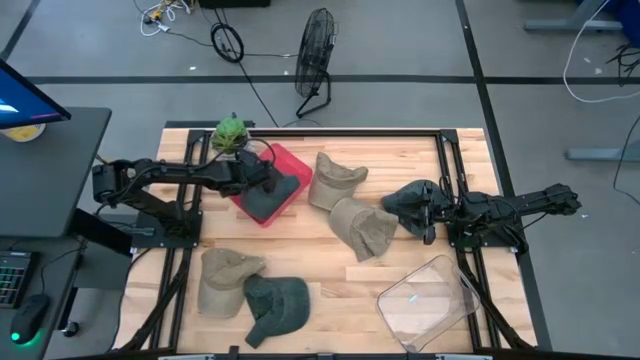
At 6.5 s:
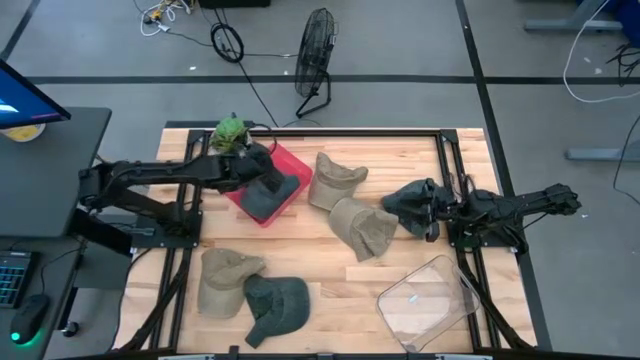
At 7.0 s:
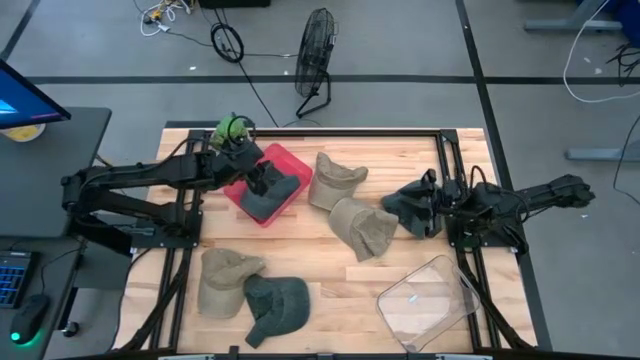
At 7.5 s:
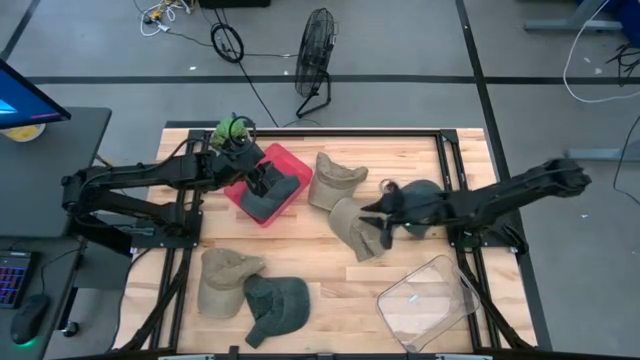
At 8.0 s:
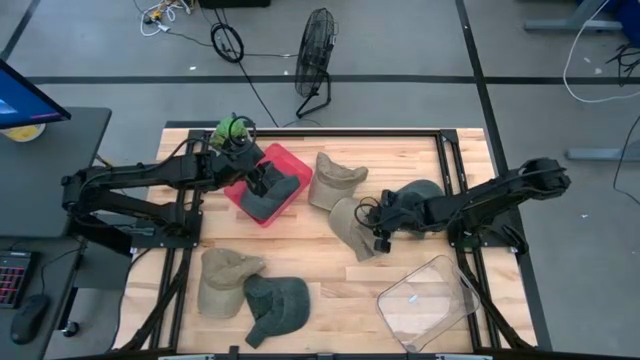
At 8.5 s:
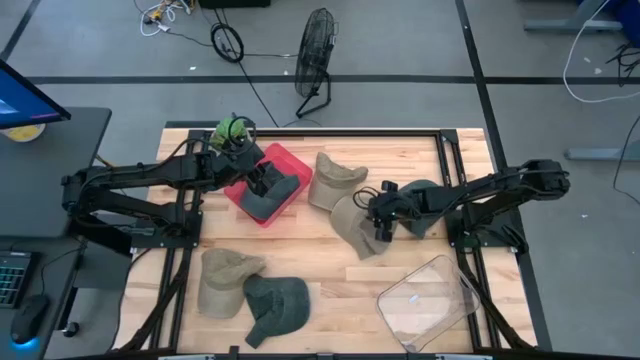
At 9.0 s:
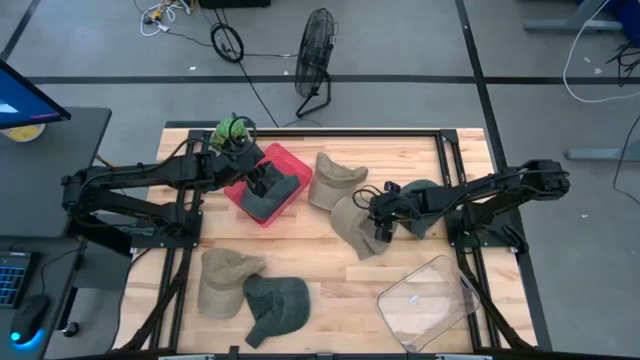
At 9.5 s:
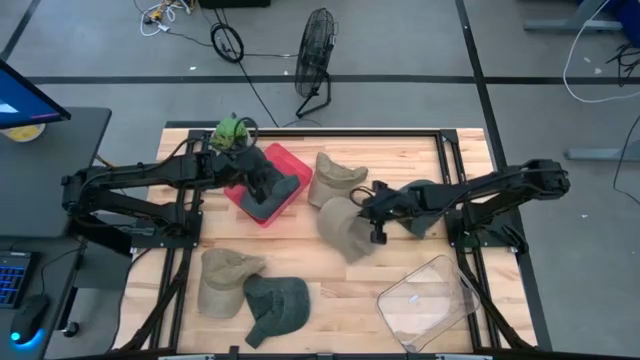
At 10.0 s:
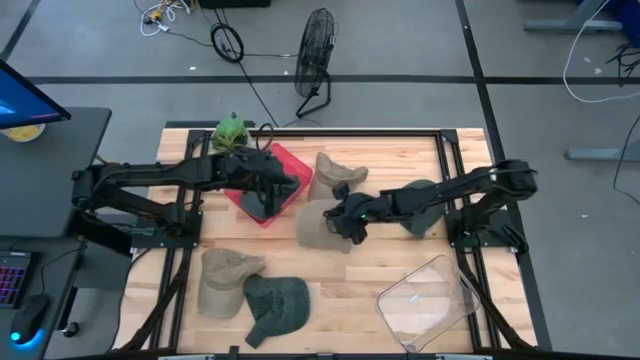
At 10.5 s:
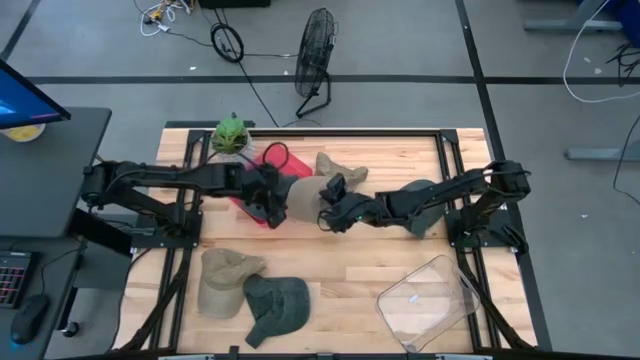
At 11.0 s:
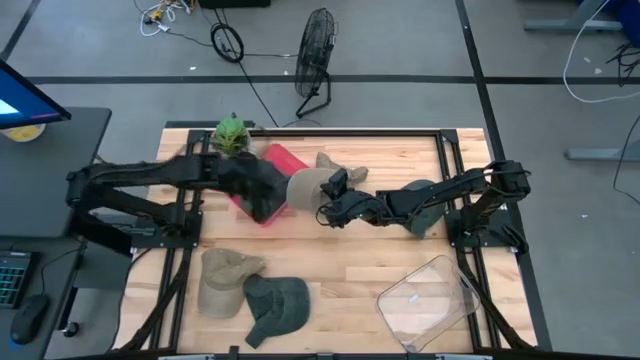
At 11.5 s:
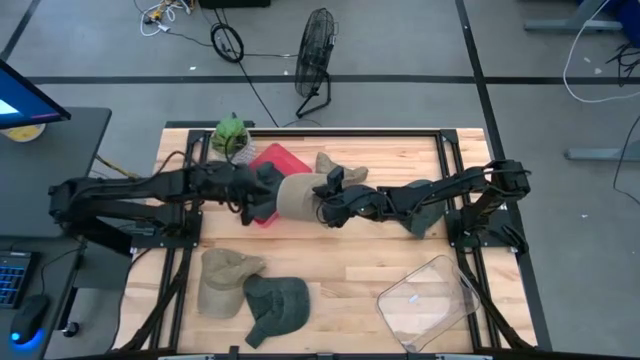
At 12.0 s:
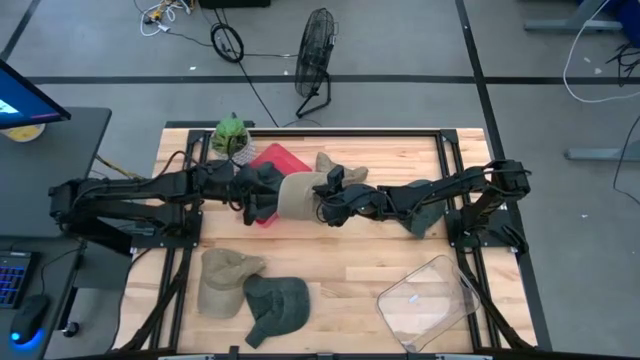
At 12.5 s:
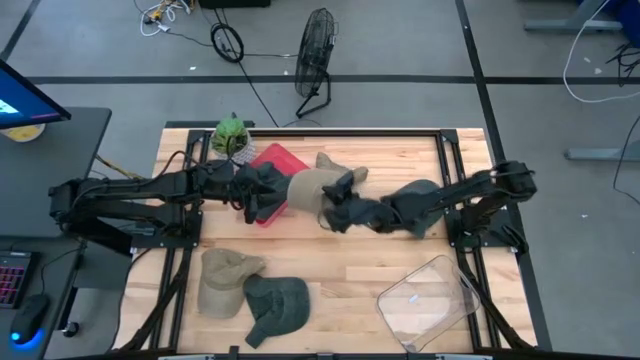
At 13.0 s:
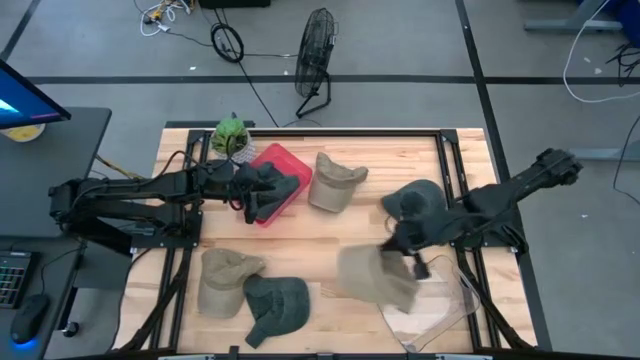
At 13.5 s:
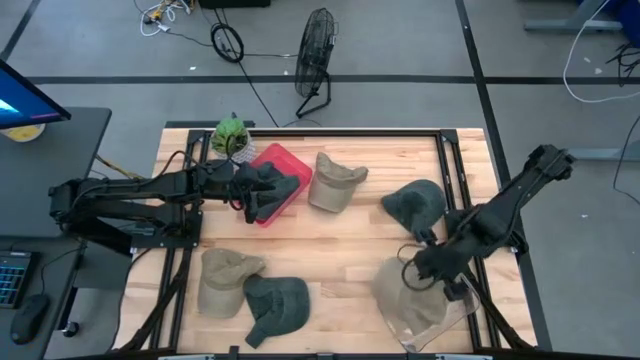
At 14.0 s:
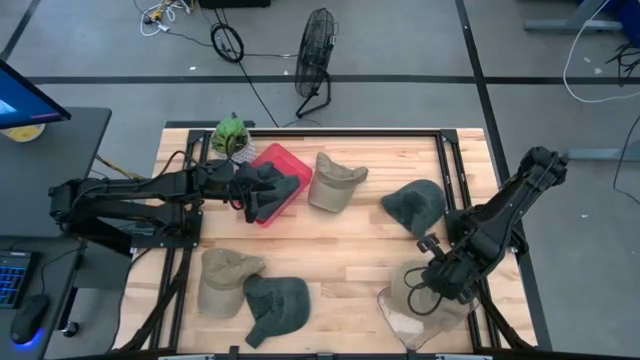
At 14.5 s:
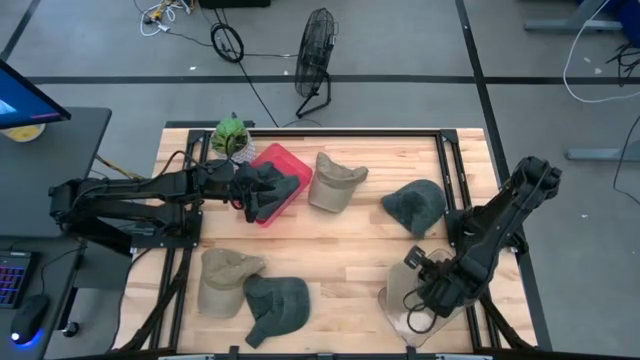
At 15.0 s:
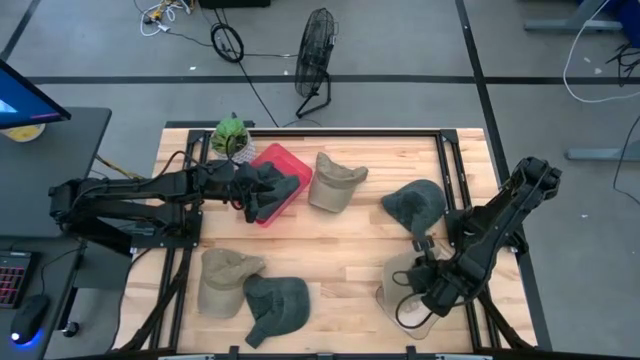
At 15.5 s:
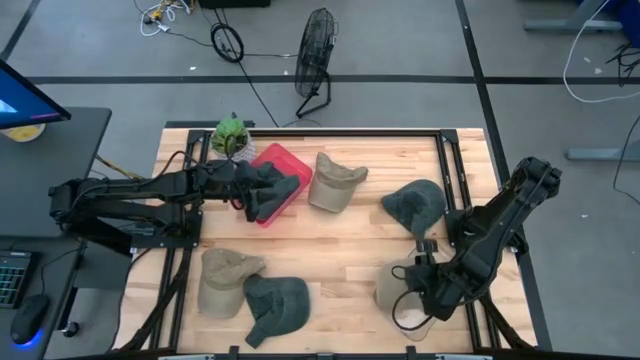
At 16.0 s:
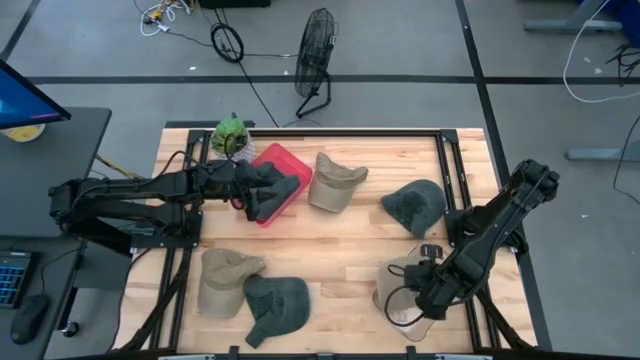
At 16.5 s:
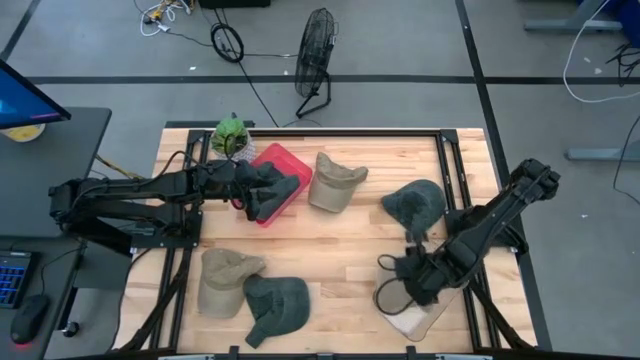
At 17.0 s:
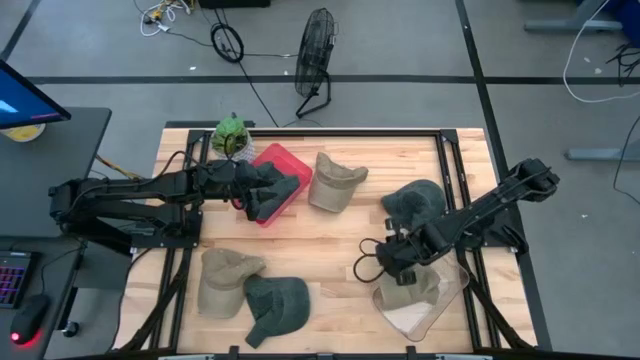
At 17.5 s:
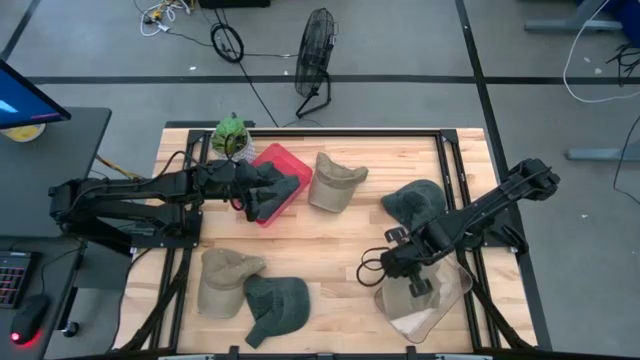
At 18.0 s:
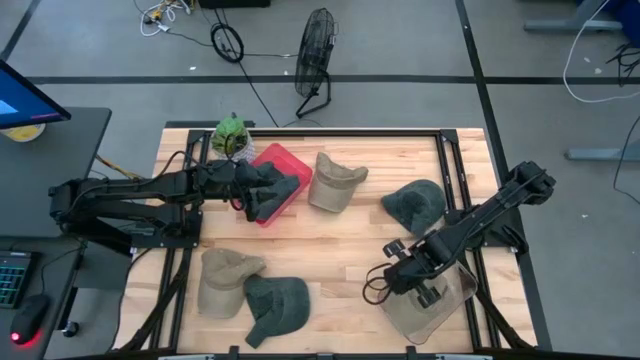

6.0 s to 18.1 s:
Task: Pick & Place hat
Put the middle right gray cap into the transparent bin

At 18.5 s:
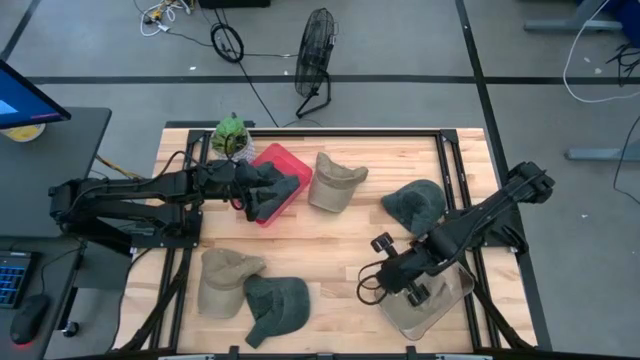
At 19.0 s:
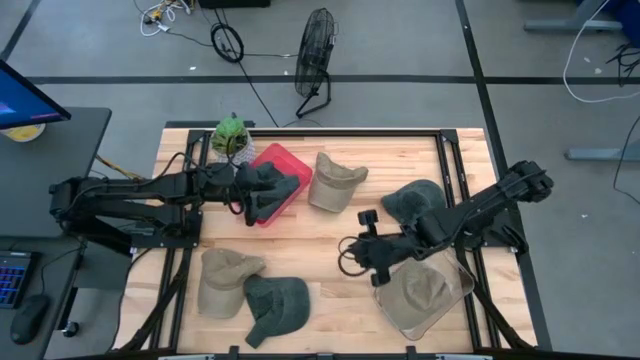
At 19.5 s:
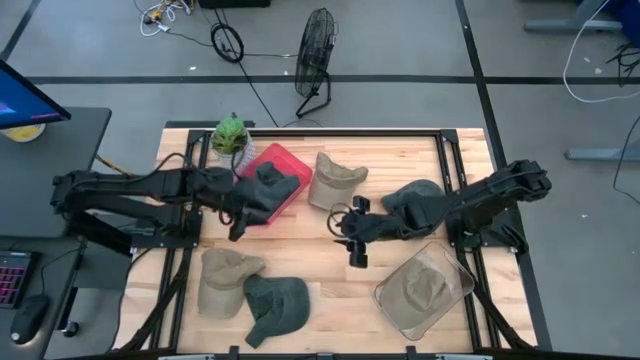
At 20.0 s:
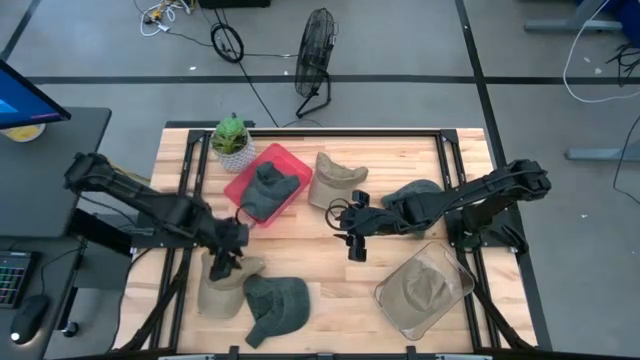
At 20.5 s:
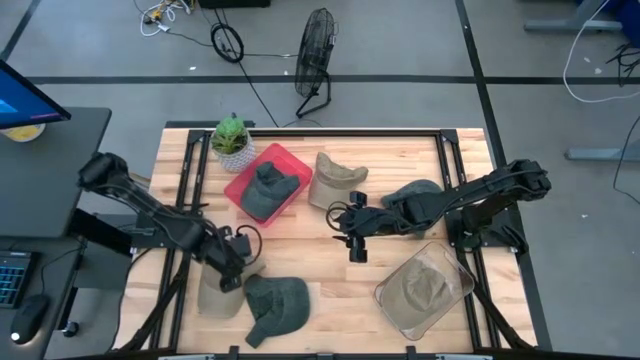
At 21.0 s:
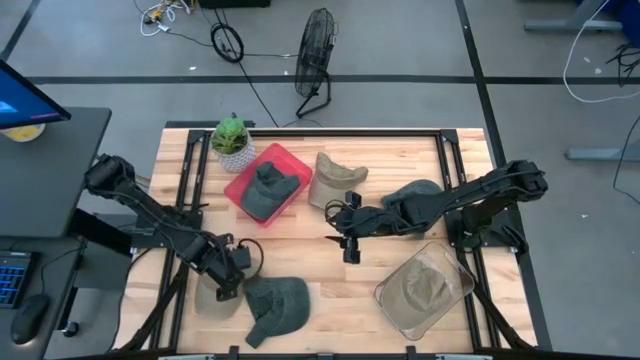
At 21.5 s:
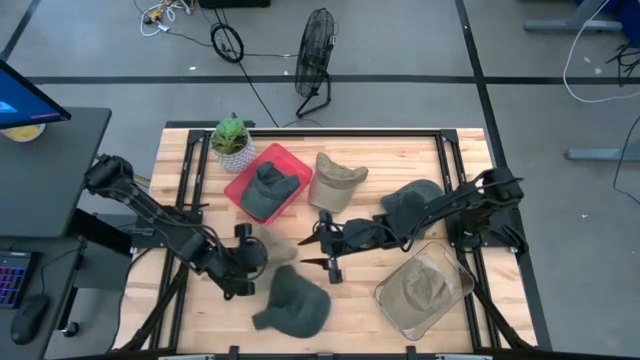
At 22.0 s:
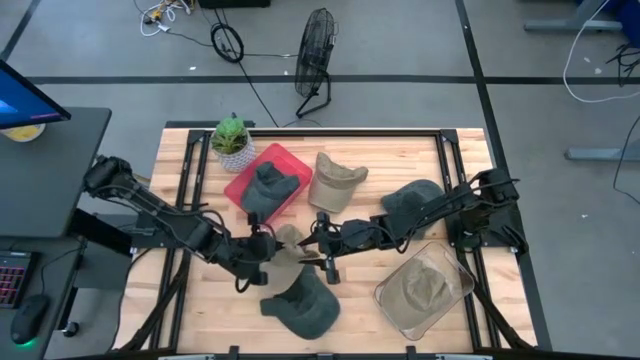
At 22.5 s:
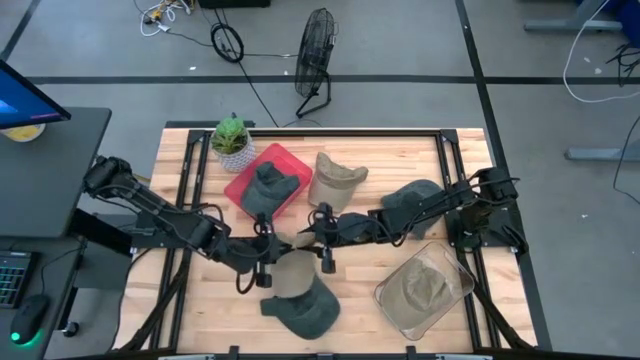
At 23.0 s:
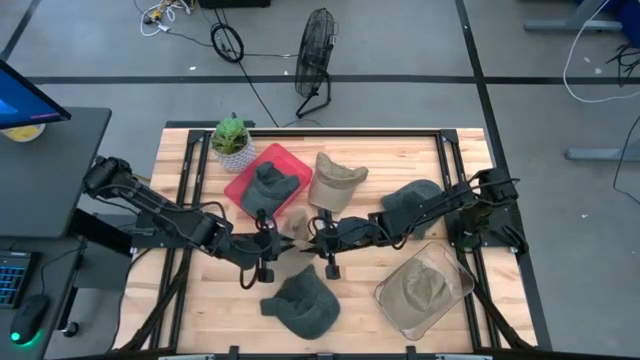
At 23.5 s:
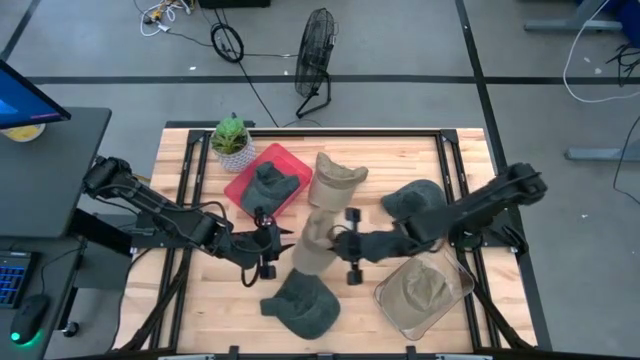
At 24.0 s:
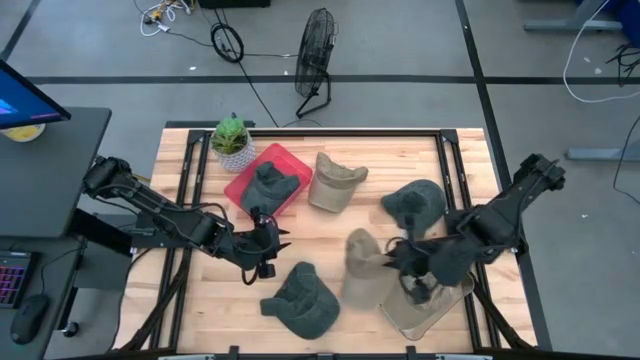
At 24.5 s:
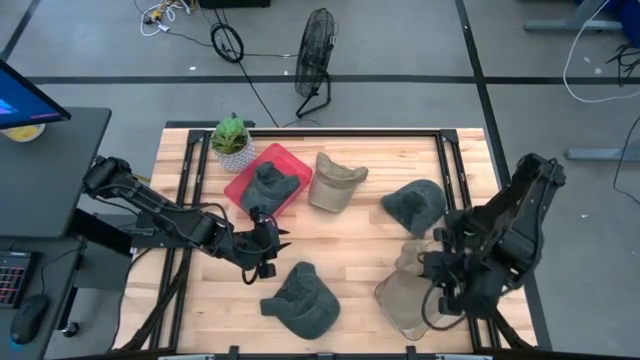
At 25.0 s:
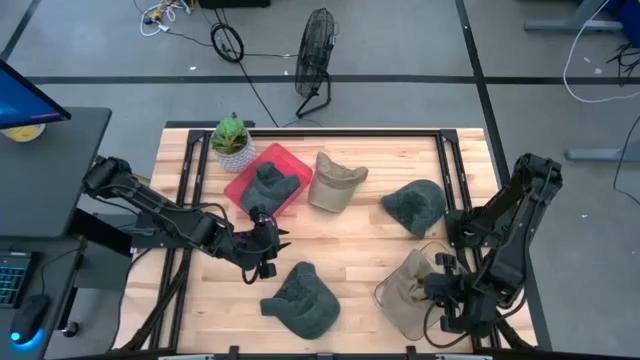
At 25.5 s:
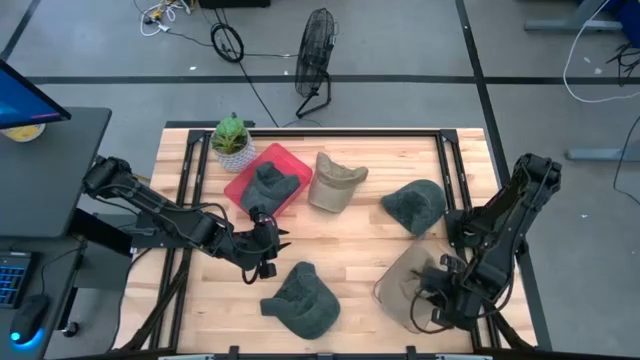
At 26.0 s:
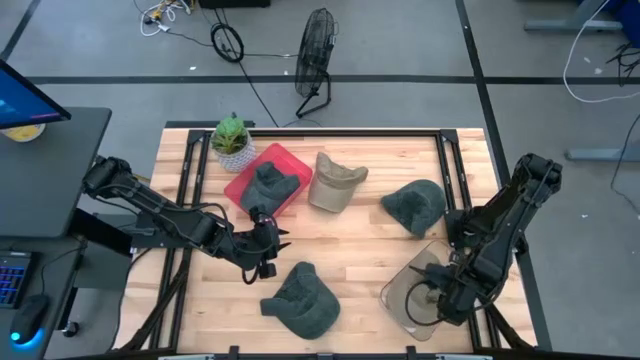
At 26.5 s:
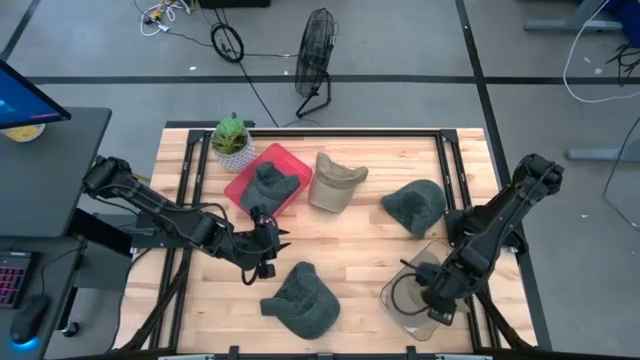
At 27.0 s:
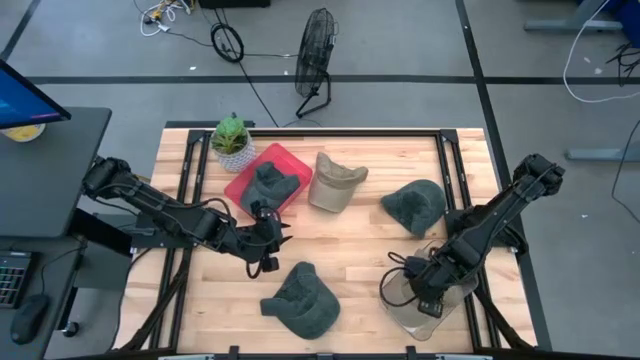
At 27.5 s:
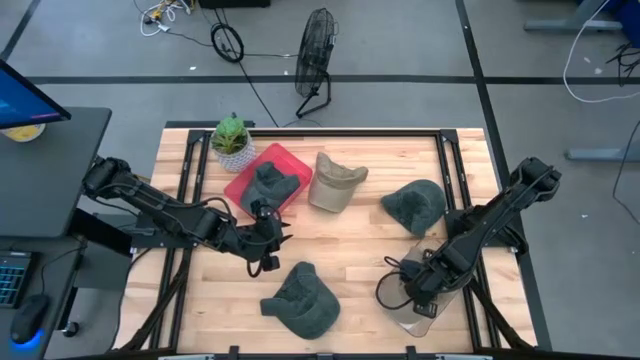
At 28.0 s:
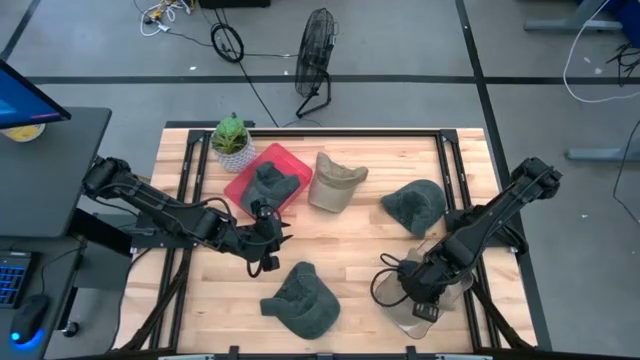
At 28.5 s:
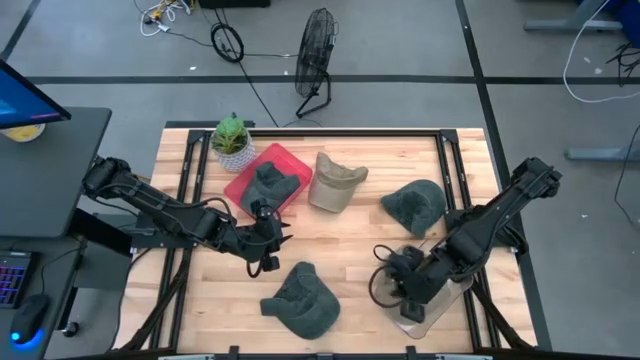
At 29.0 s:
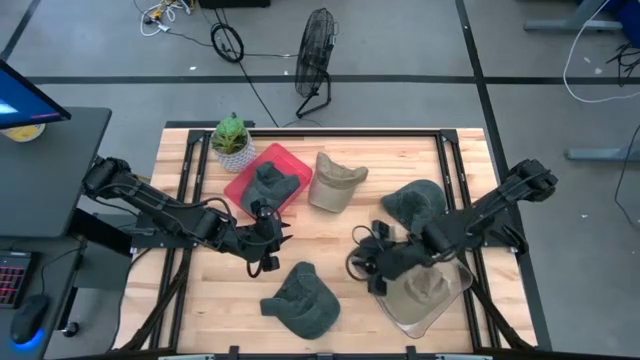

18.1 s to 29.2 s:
Put the bottom gray cap into the transparent bin
